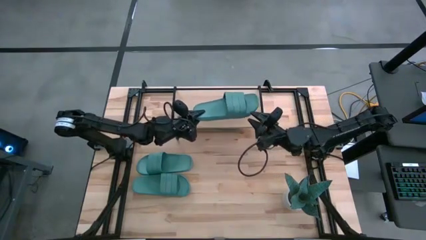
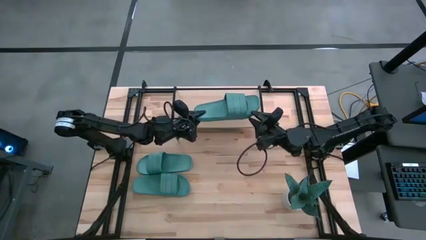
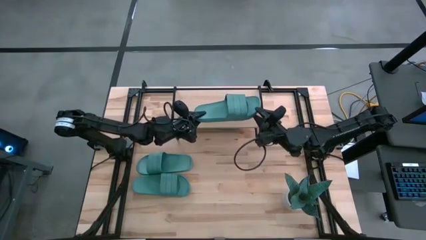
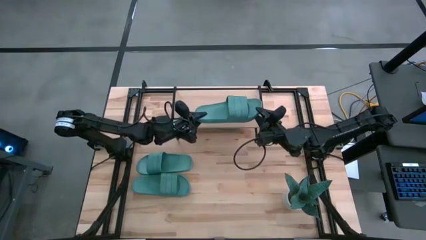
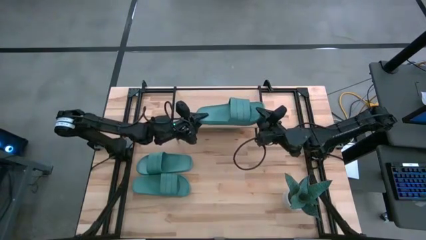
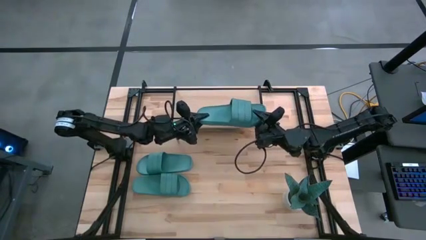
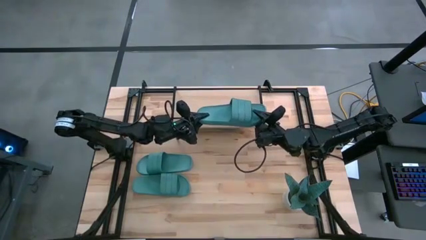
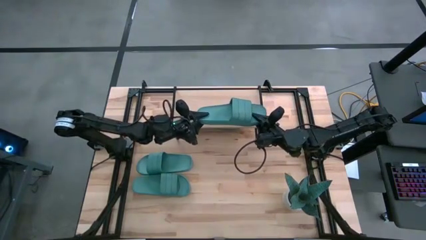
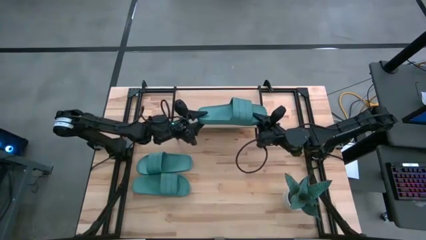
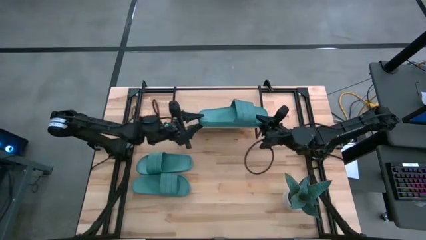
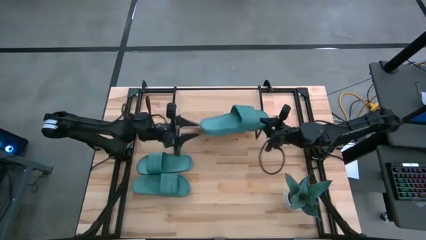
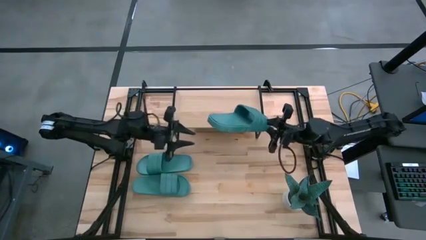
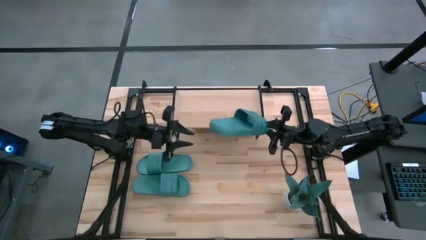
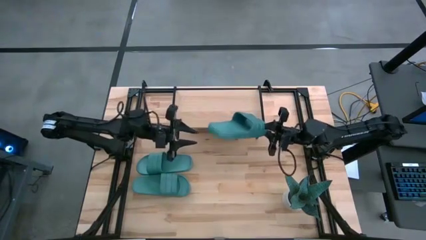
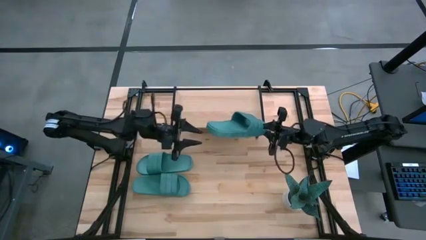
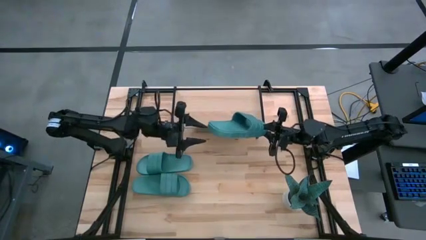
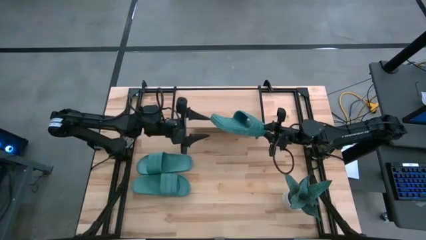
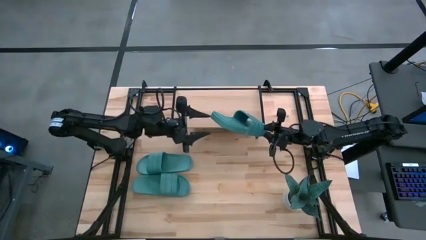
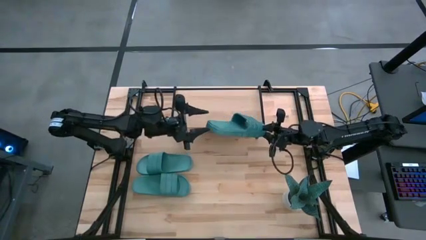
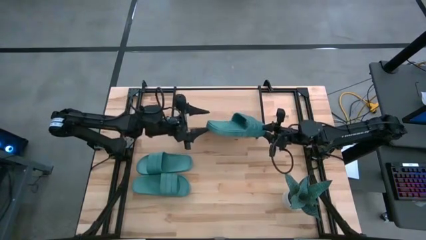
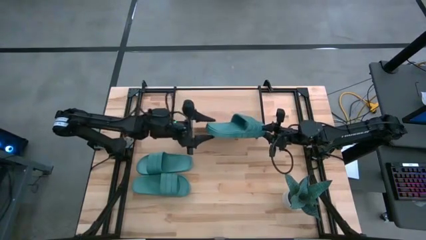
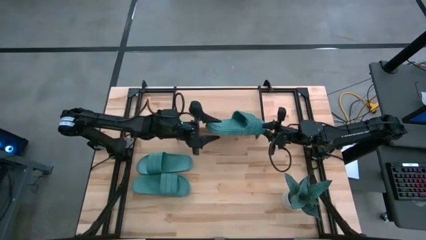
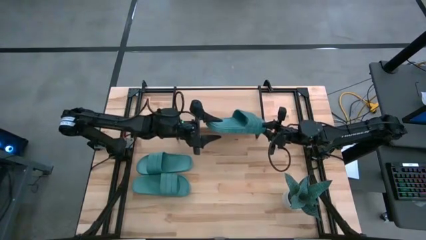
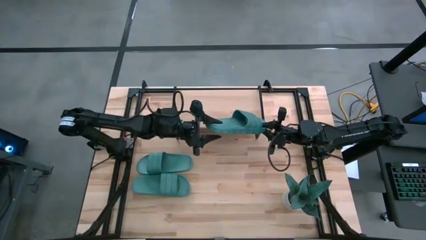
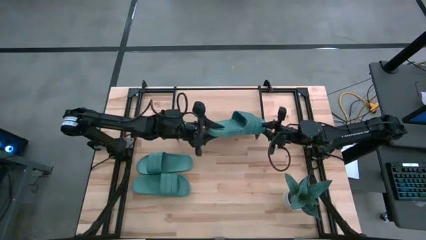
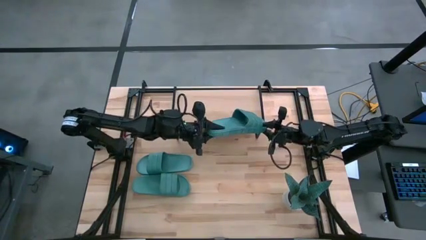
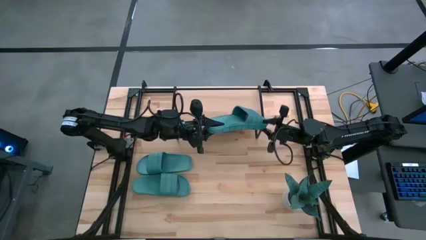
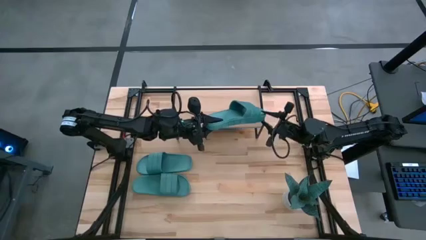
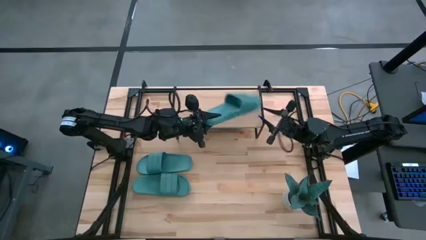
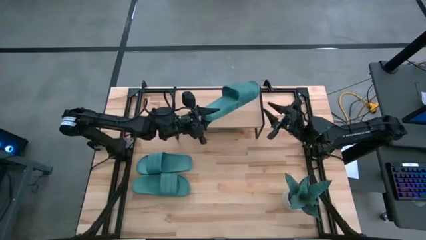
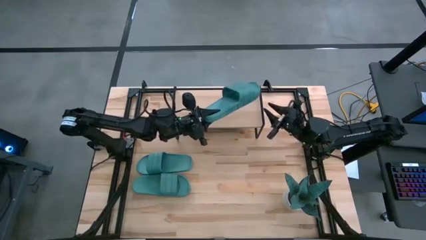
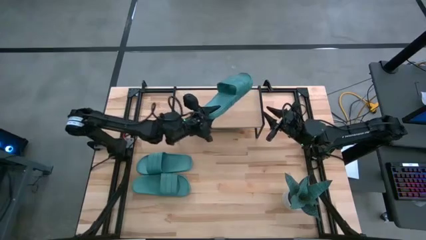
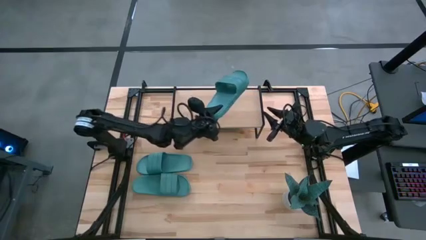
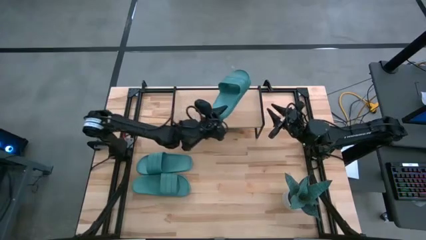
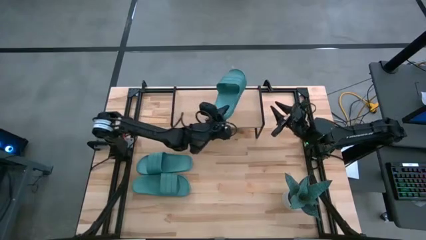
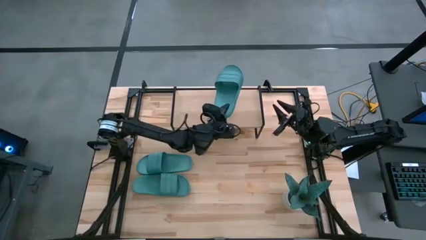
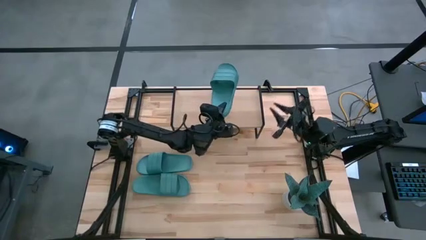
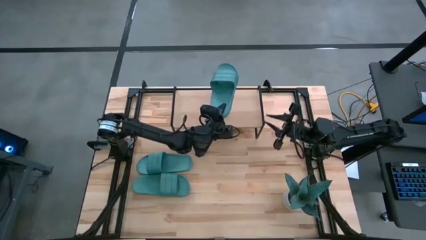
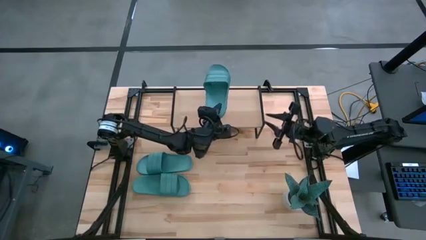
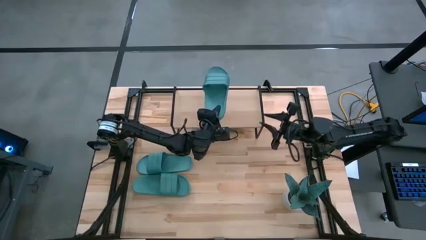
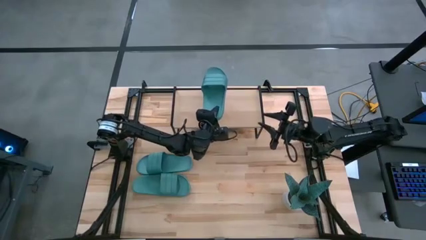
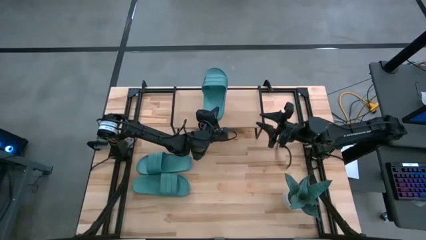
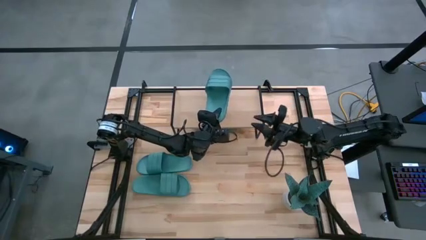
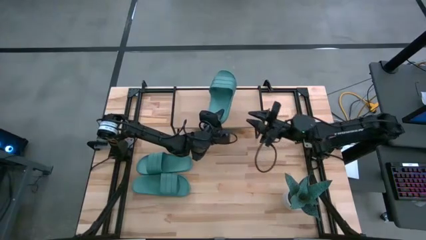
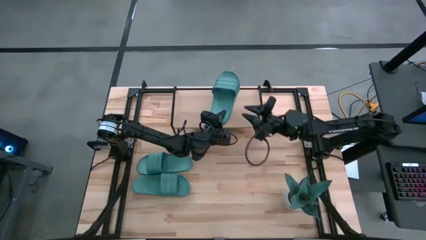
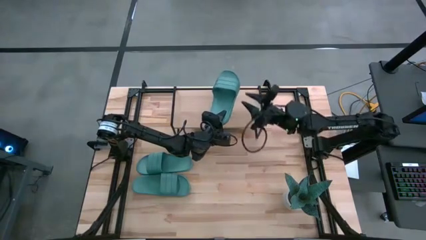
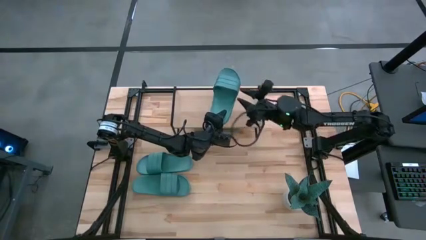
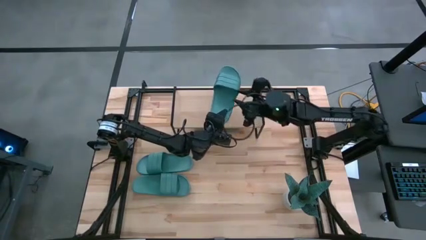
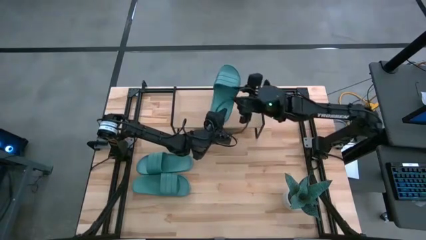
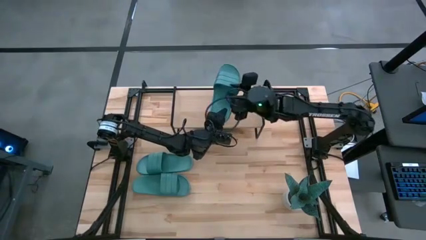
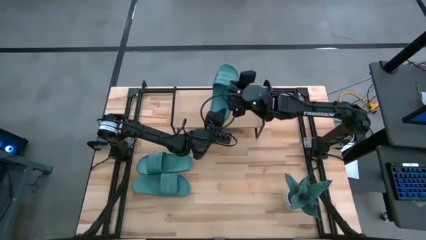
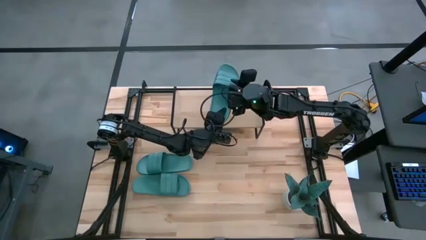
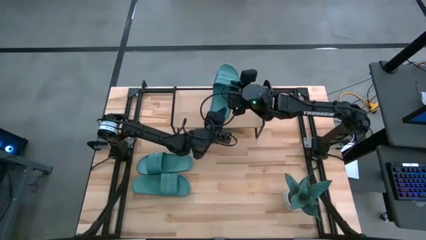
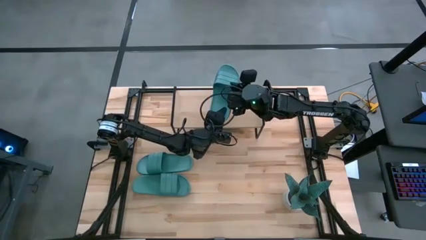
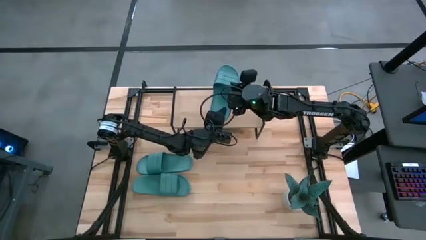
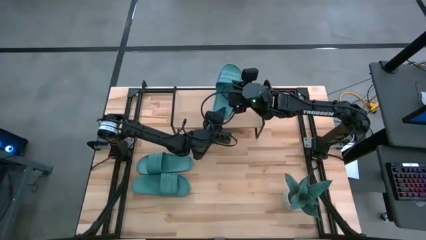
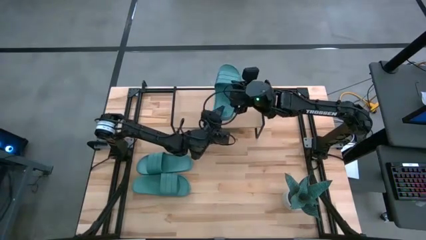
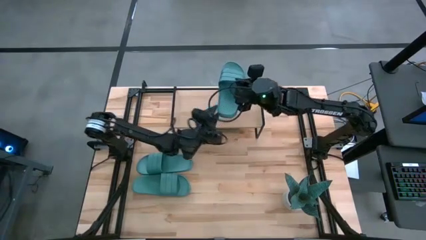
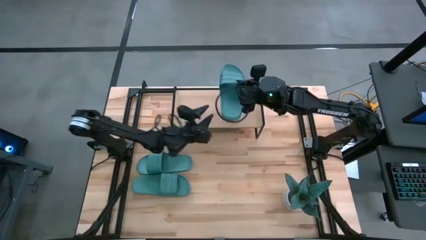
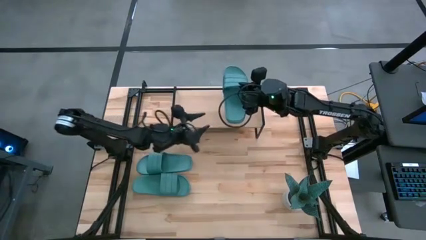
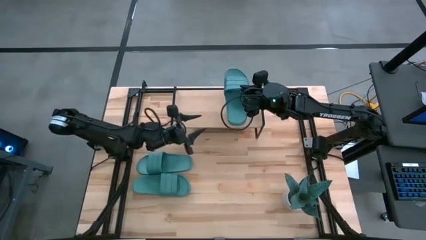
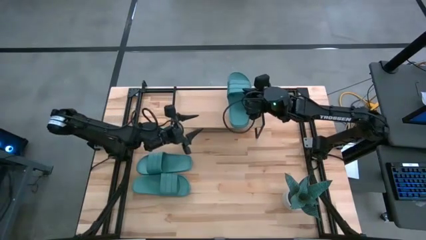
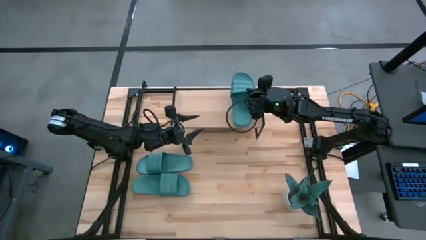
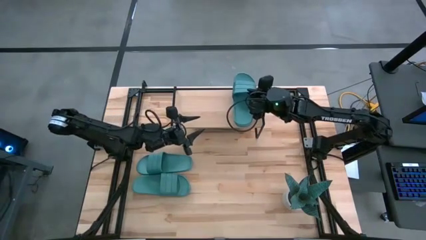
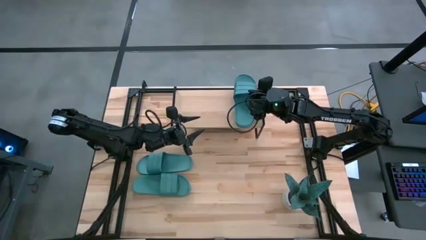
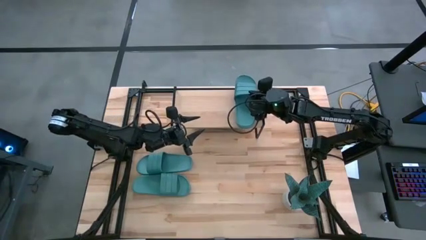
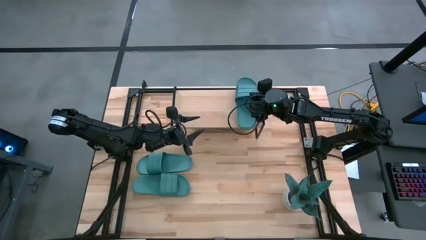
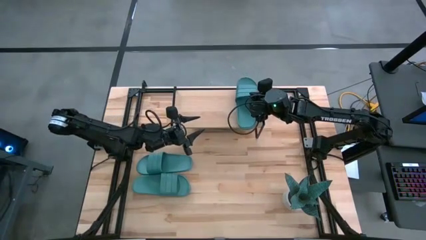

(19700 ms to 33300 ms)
Task: Pick and place slides into the shelf
Put the green slides on the shelf
